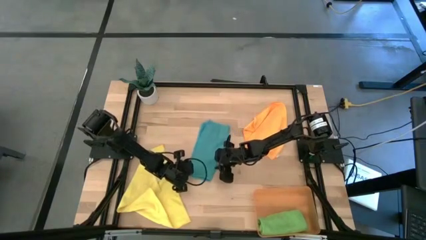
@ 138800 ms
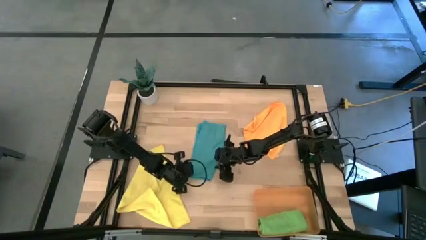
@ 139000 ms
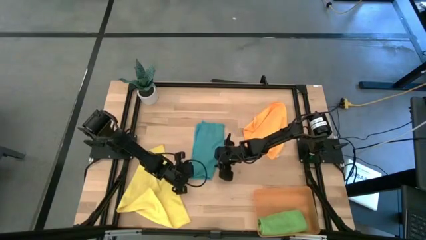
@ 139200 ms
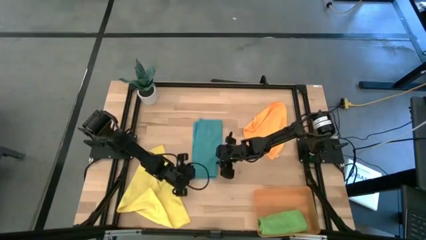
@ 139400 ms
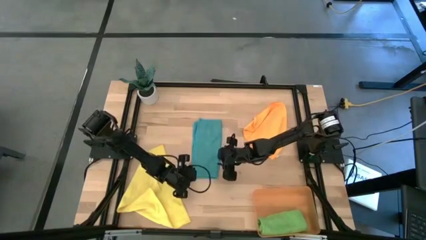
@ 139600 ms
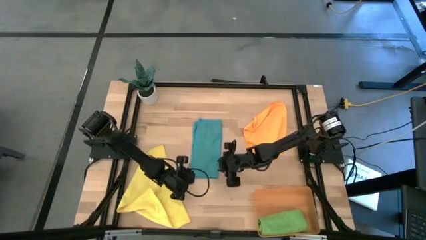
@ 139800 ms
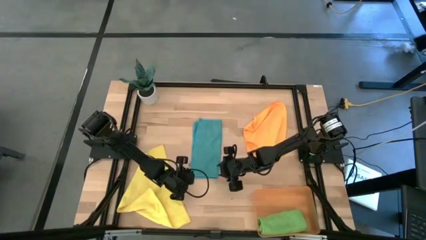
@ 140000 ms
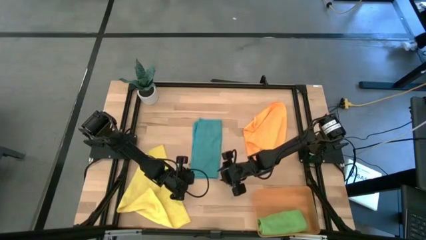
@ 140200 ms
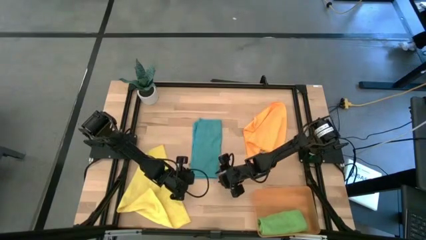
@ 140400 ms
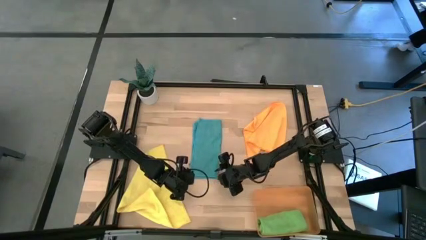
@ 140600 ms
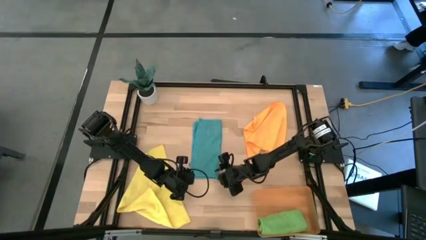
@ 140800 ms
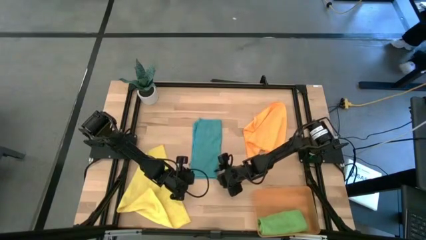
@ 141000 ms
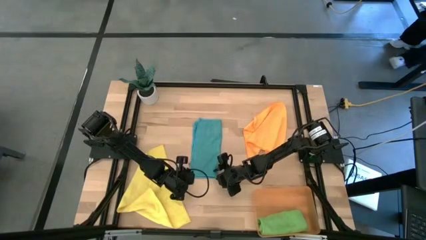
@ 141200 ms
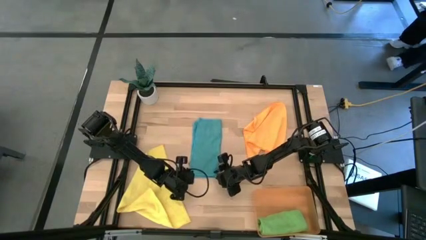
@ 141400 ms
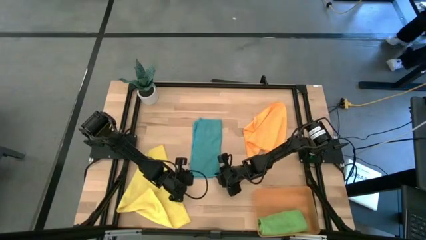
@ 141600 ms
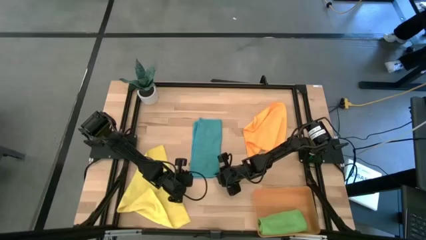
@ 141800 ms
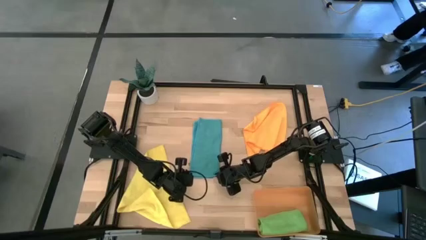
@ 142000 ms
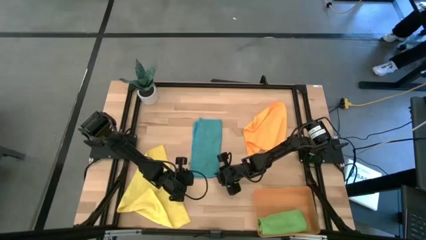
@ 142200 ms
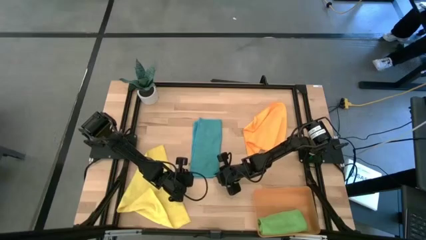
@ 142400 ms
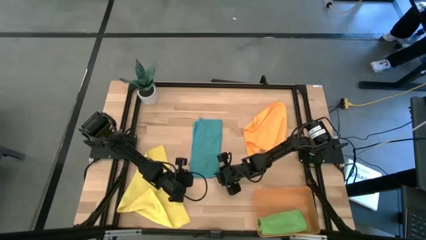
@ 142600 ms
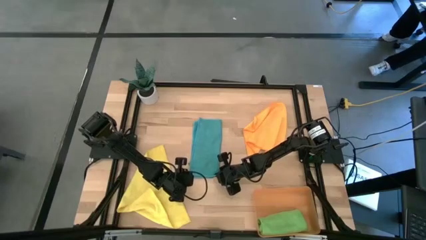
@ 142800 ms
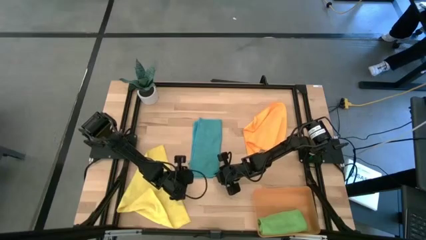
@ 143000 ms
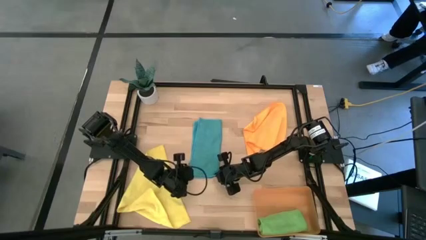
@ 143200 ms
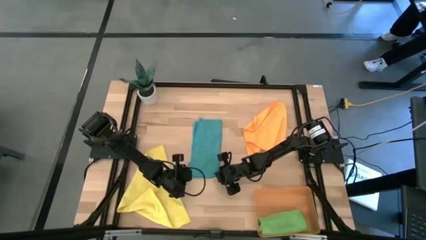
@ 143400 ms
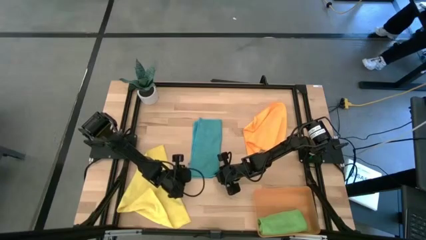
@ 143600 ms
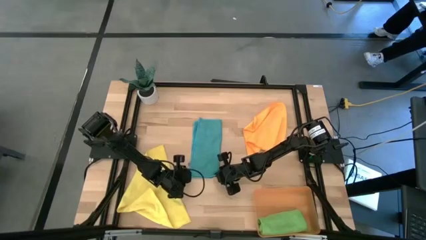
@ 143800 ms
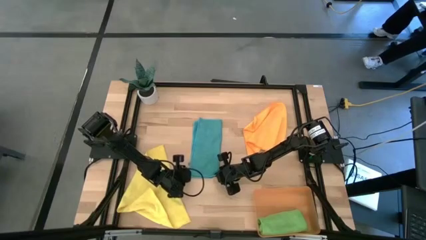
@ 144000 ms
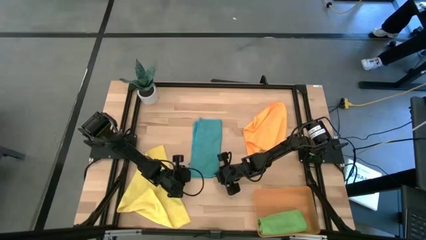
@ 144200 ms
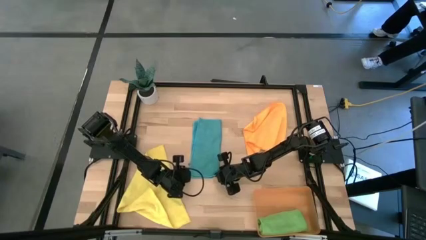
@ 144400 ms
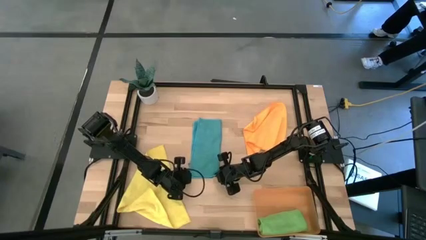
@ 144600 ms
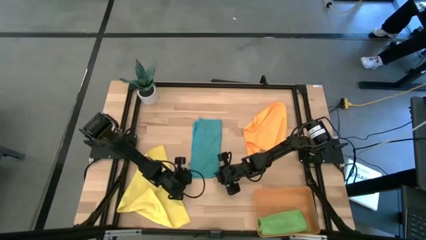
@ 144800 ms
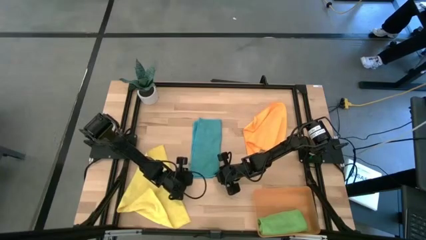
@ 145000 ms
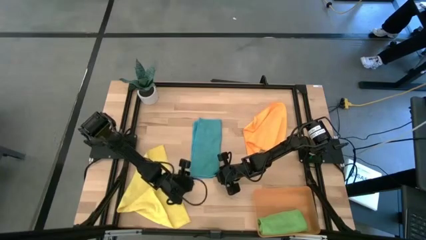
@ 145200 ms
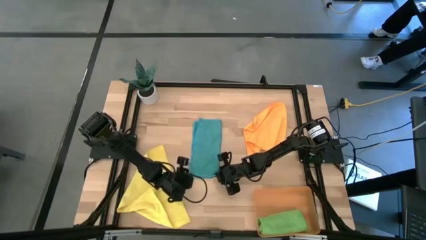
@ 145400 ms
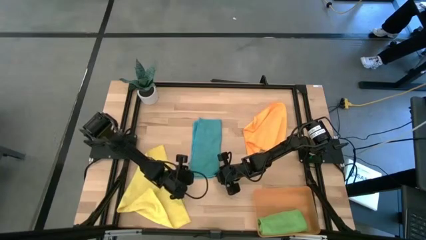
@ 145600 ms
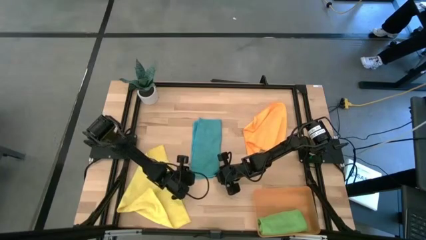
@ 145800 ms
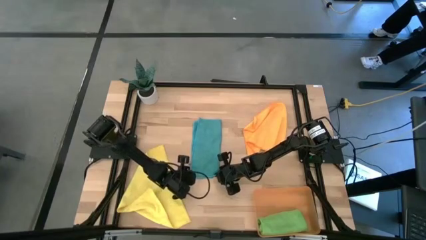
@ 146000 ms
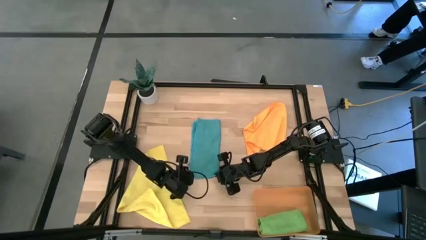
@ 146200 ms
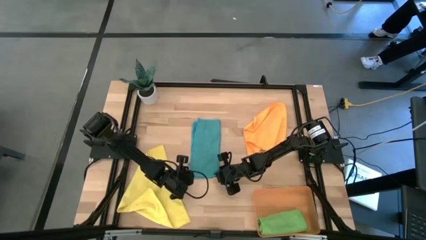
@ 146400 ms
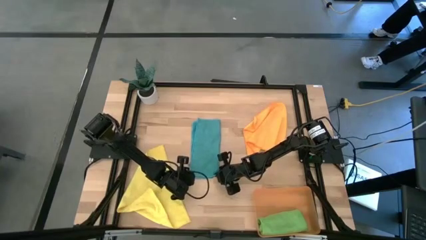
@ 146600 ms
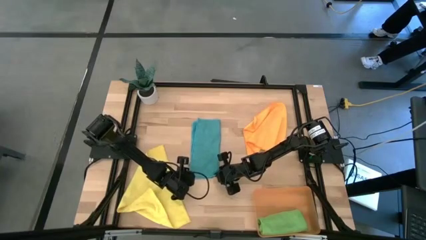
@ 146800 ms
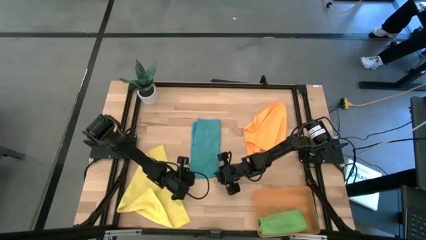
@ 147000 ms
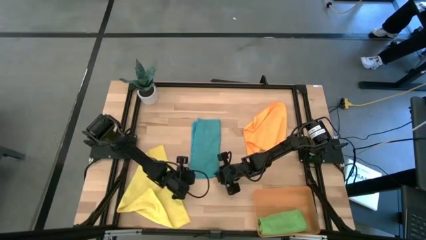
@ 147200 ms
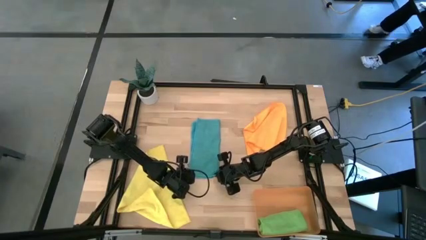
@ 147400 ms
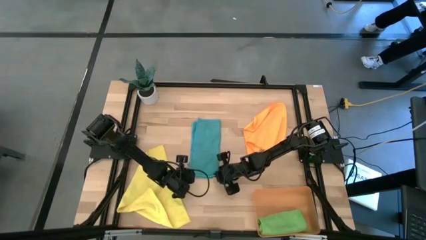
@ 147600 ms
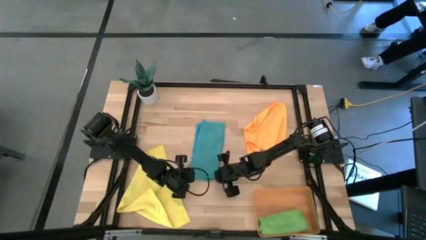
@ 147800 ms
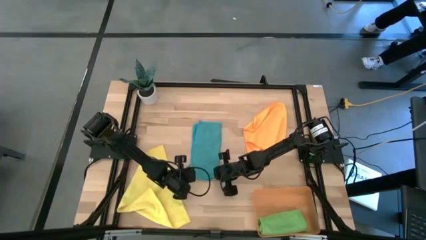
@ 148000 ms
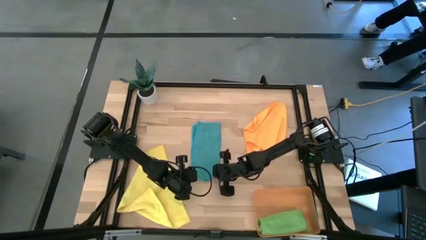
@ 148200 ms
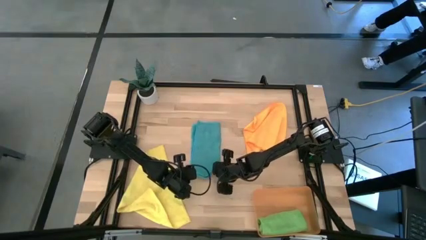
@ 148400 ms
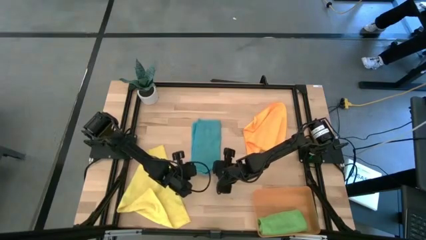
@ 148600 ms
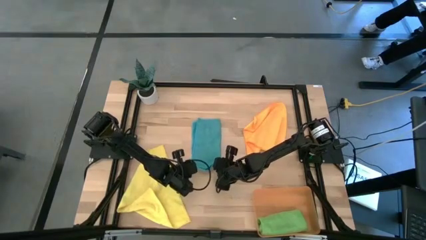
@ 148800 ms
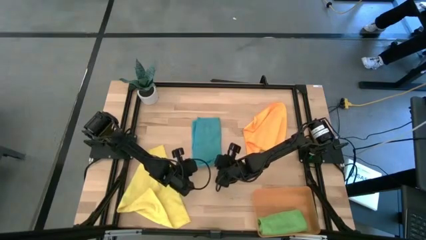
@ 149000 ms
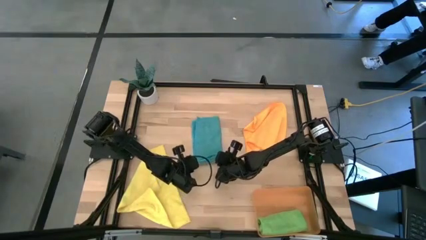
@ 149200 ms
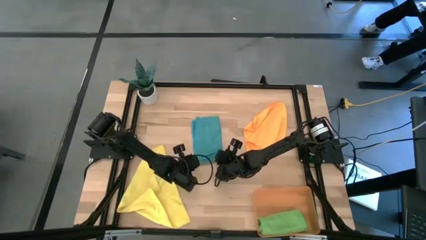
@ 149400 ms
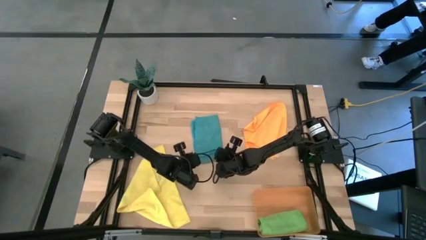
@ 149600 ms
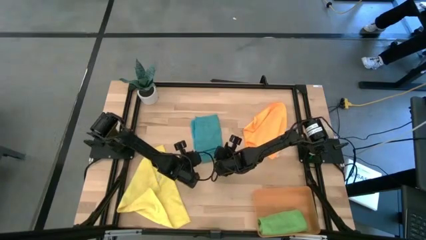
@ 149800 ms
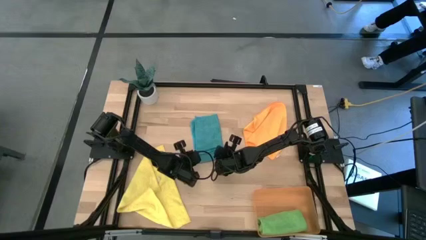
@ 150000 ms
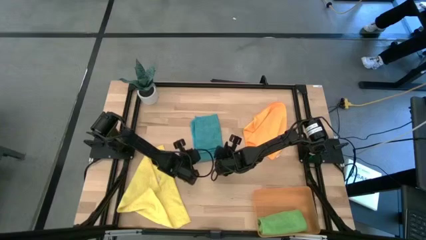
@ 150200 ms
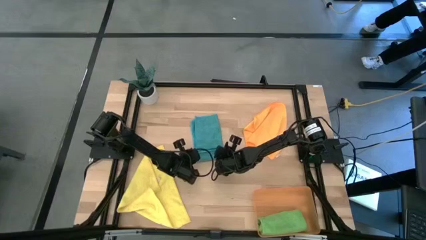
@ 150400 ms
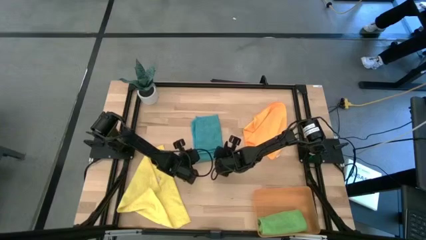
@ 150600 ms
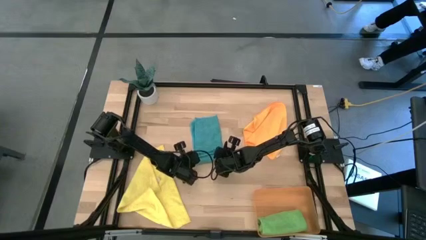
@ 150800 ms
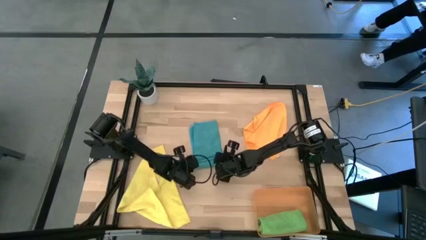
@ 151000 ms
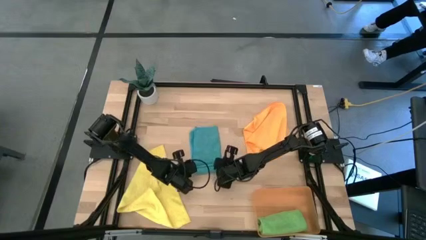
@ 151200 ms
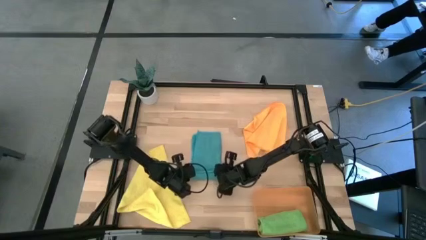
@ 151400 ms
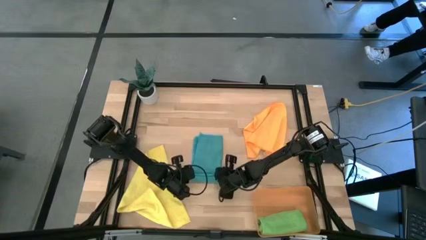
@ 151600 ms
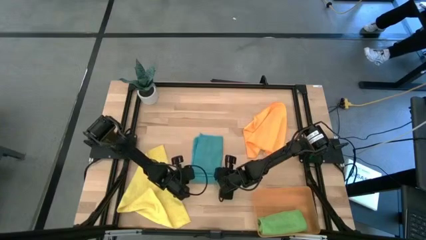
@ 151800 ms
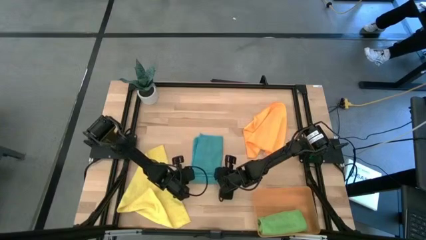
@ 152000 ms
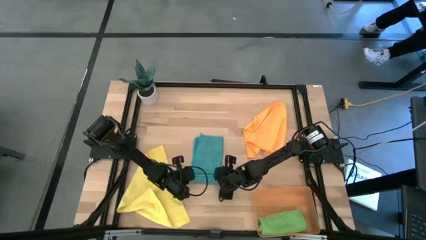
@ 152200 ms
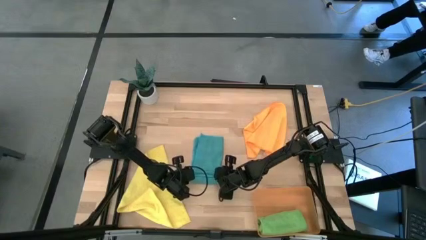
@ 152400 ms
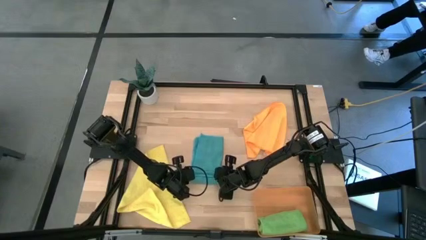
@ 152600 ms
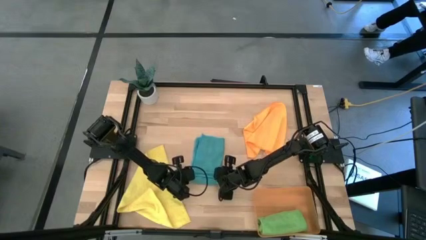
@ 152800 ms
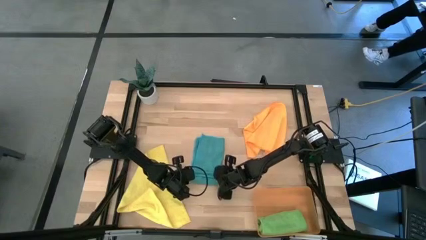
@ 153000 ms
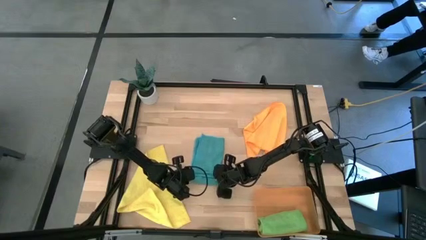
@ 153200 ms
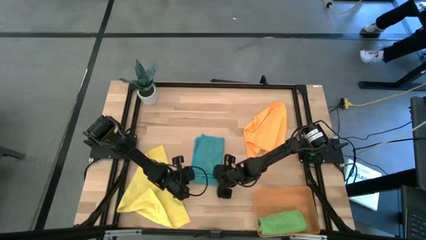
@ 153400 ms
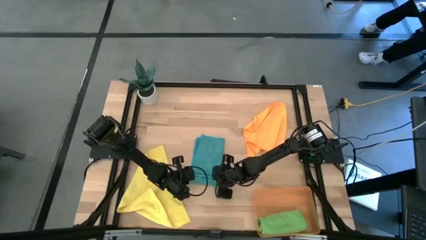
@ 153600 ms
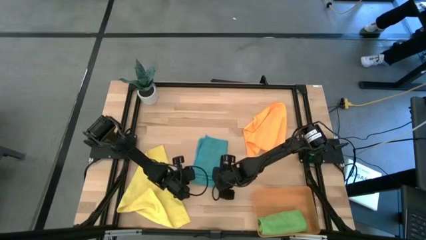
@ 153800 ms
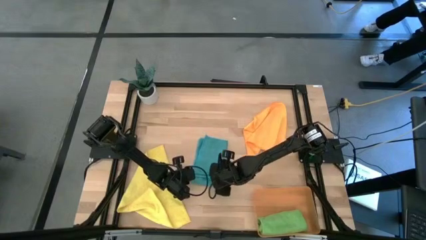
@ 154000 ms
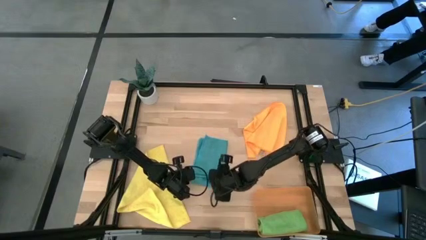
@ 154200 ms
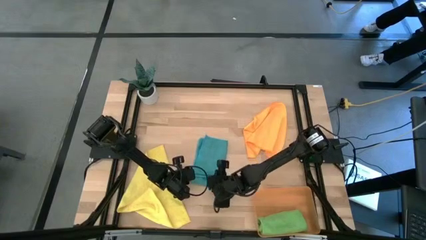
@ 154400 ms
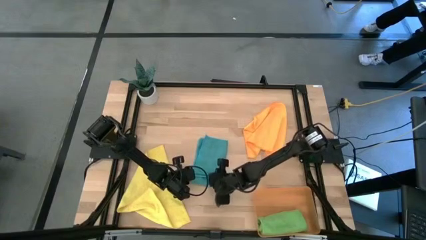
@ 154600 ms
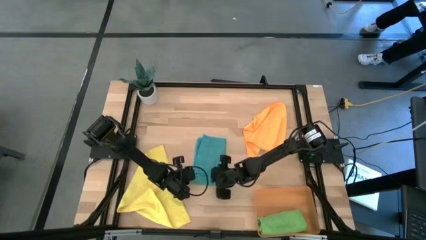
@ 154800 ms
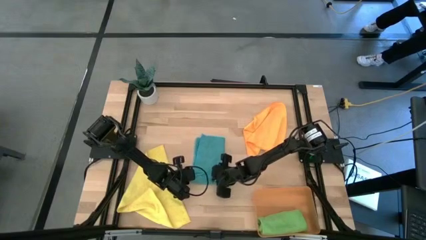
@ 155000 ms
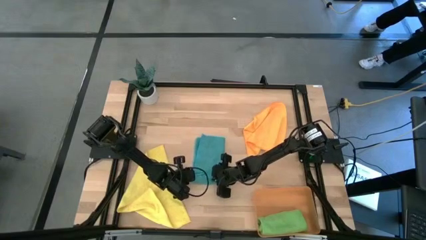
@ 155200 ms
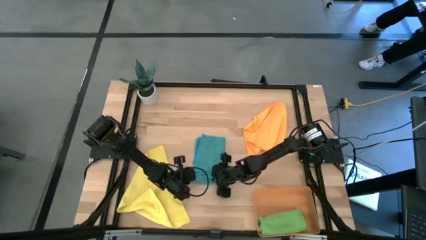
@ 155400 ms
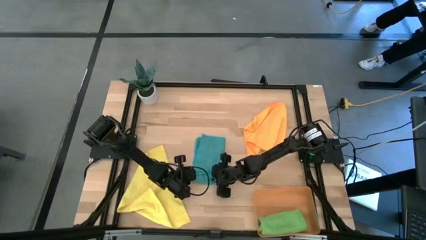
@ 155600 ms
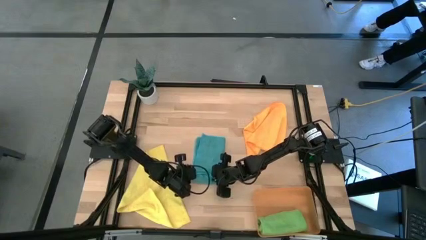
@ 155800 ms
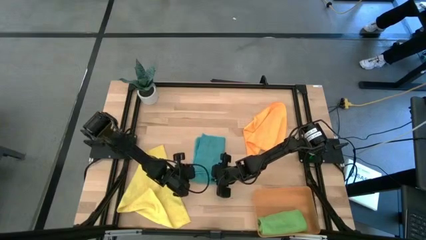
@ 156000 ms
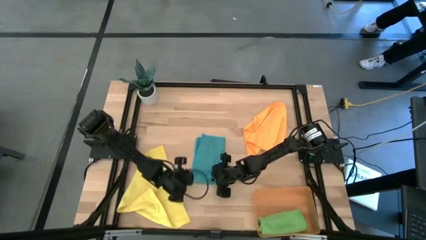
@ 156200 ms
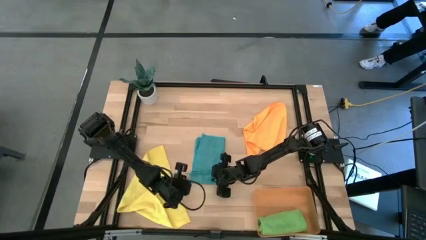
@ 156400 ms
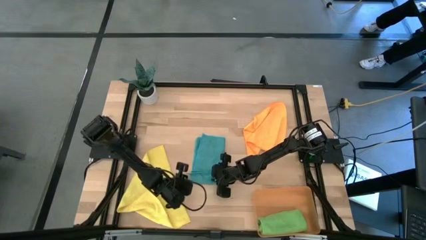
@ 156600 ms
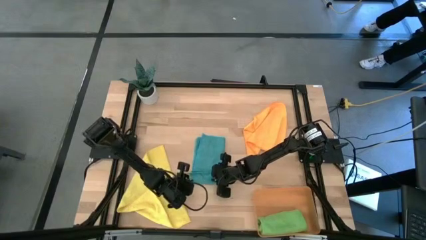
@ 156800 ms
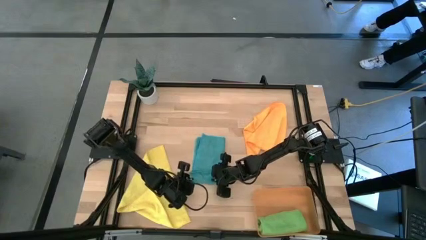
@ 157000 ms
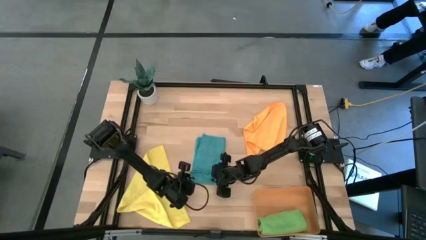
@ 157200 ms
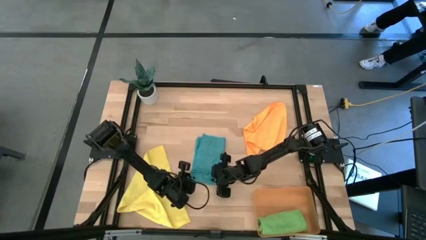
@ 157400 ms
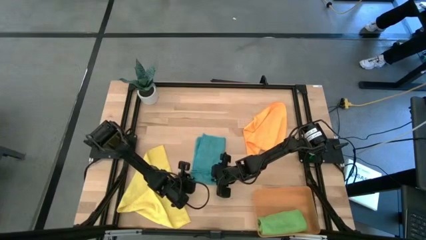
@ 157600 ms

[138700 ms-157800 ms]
Task: Roll microfiber towels into tight, uniform cylinder then place into a basket
Roll the blue microfiber towel
